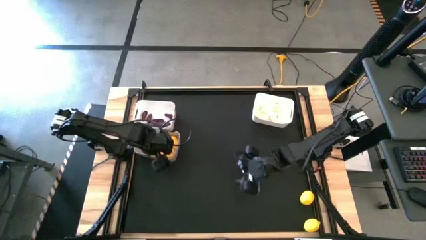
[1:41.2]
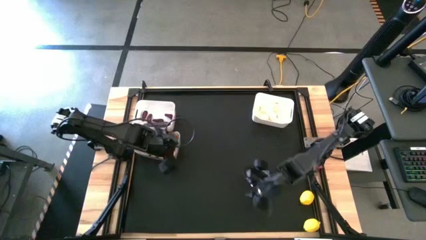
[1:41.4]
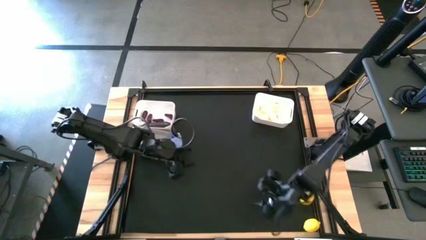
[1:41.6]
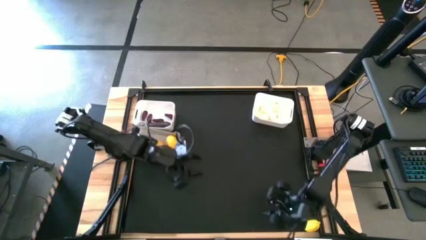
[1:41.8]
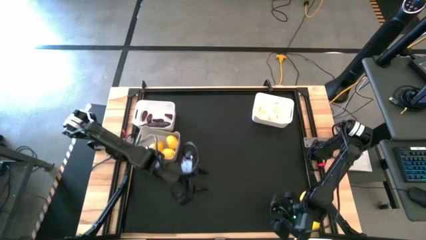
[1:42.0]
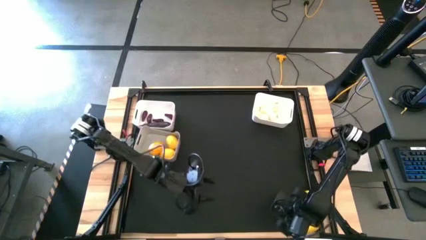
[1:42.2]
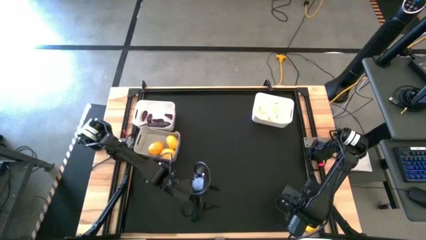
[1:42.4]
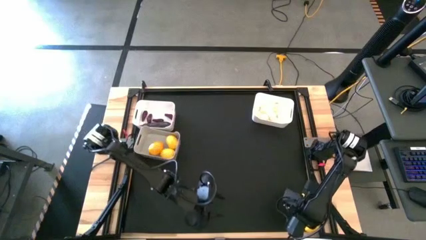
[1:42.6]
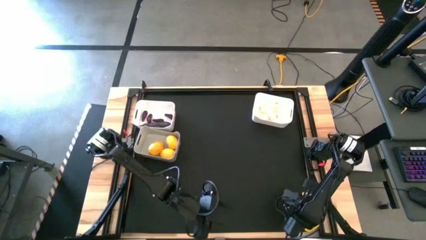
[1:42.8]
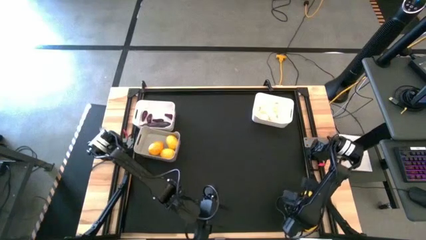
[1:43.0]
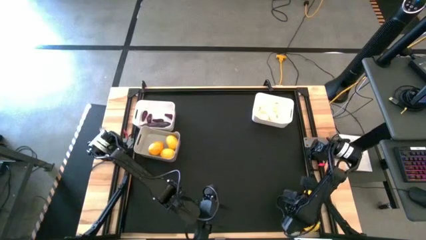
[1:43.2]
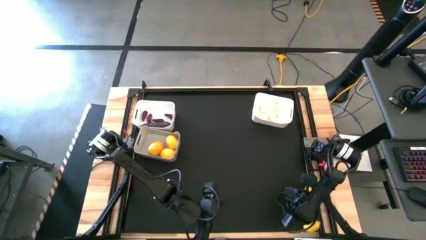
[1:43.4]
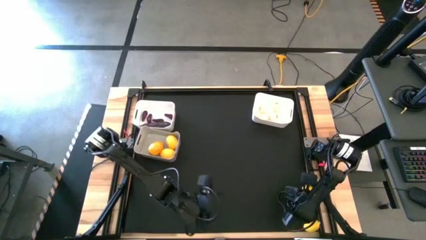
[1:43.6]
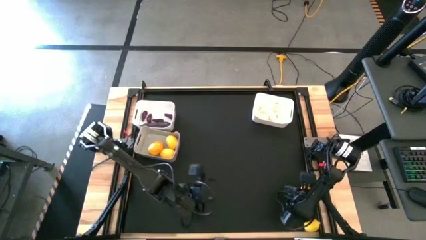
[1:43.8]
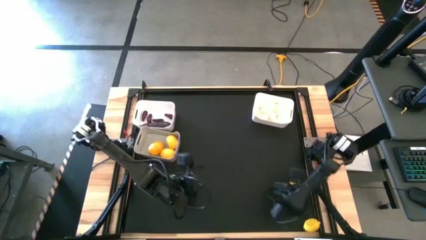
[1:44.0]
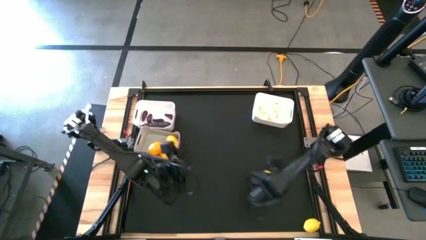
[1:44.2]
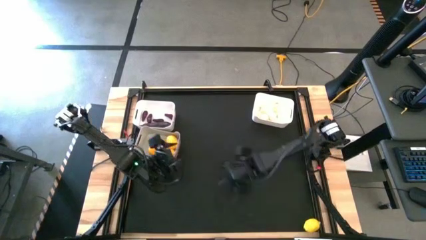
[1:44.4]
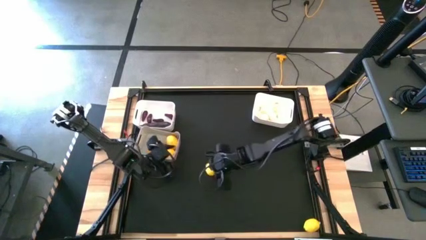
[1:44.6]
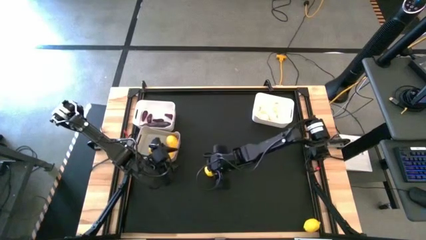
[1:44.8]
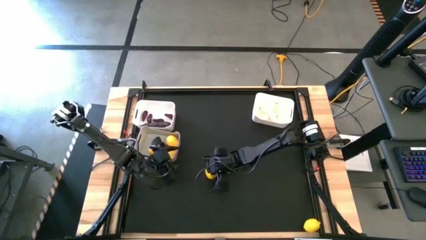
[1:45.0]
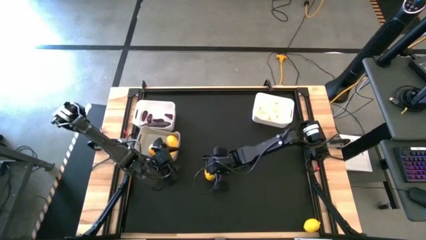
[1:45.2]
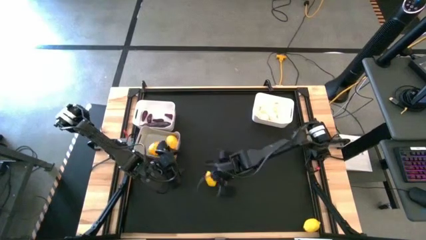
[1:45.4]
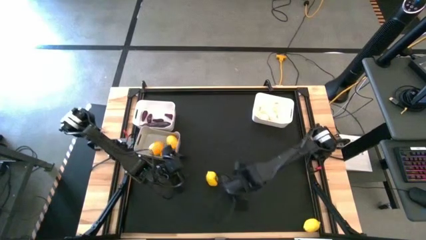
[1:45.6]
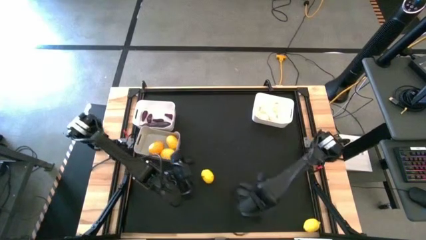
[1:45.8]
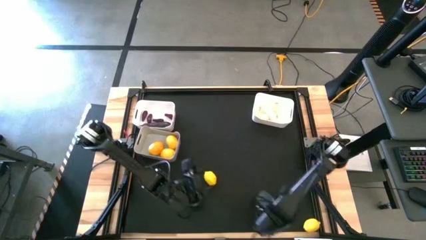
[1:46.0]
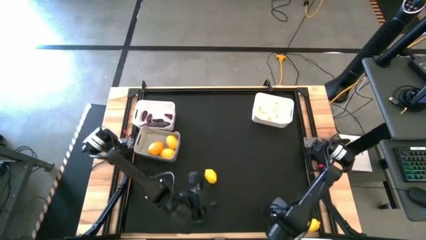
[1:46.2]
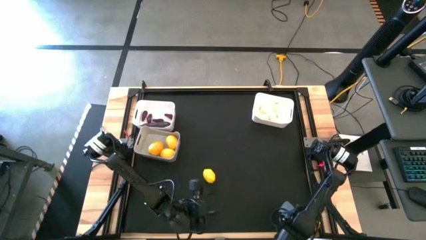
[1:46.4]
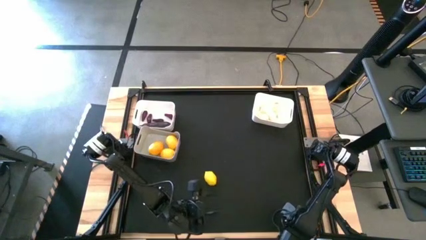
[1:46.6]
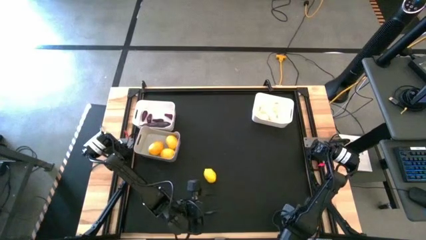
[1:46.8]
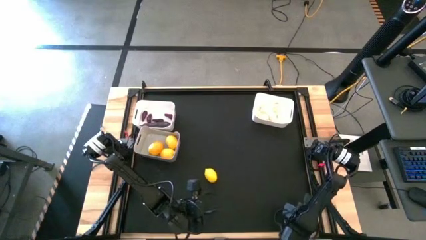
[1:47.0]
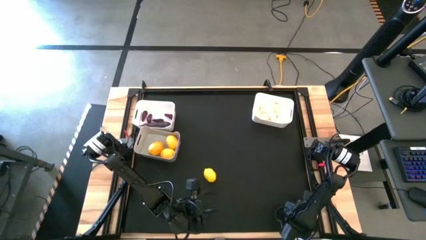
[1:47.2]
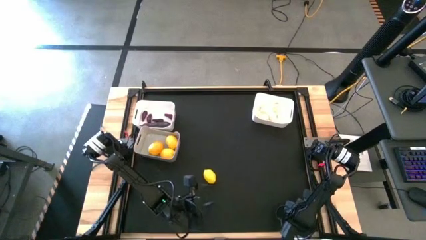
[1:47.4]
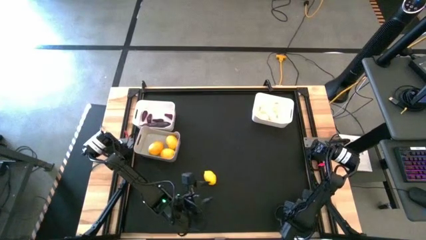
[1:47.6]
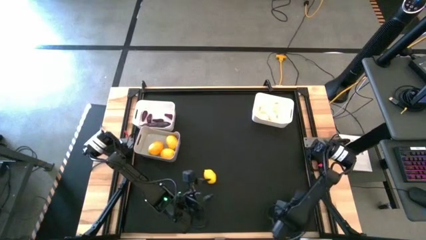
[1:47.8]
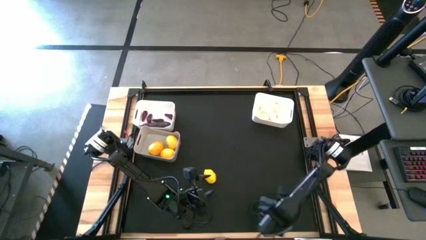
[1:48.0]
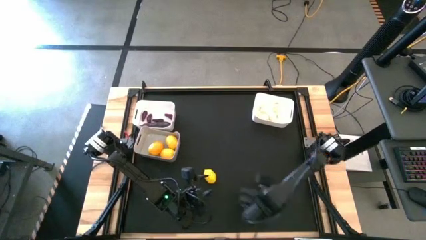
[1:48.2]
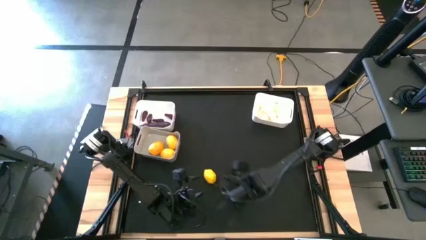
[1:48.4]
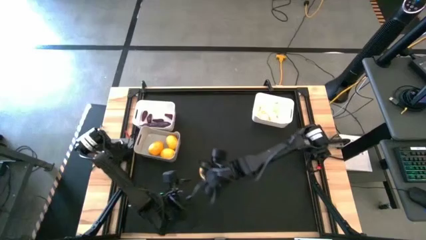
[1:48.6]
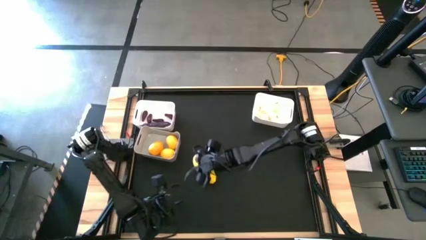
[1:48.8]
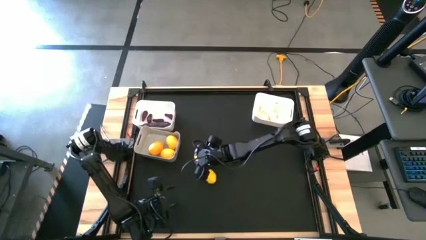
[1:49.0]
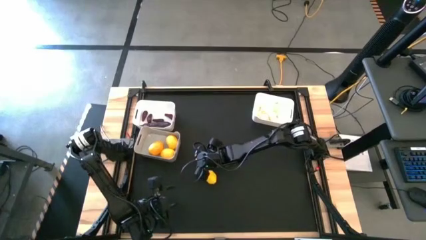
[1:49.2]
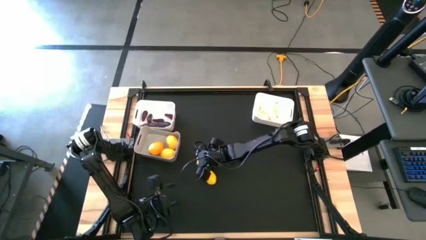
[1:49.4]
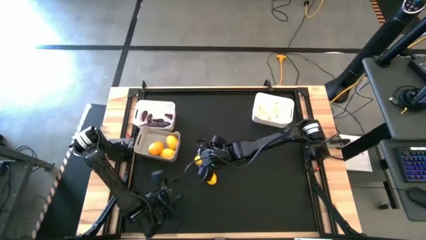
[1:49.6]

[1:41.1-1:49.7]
Task: Sort produce into baskets
Move the lemon to the center of the table

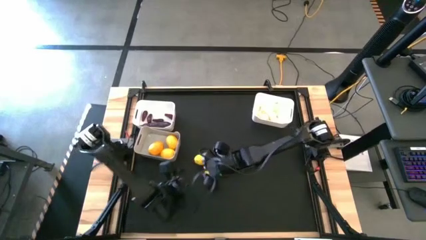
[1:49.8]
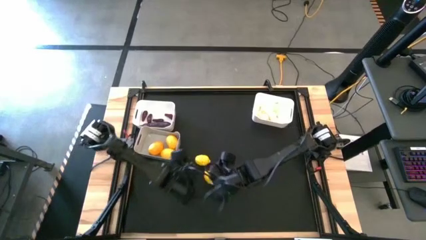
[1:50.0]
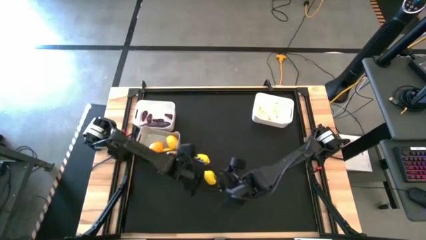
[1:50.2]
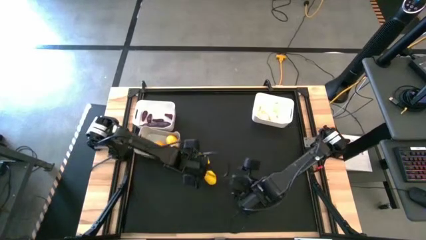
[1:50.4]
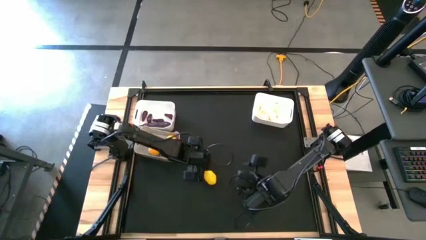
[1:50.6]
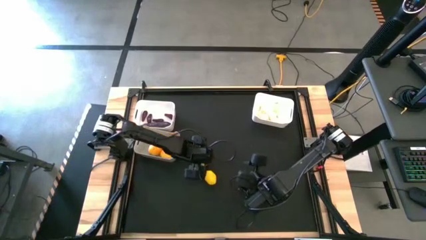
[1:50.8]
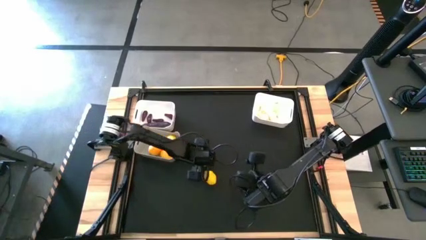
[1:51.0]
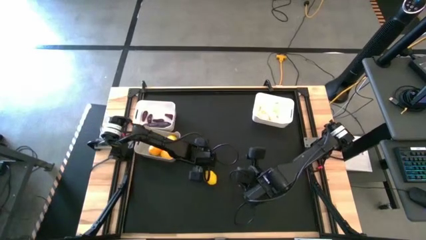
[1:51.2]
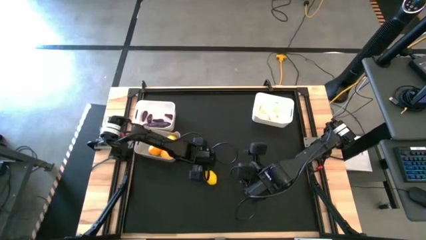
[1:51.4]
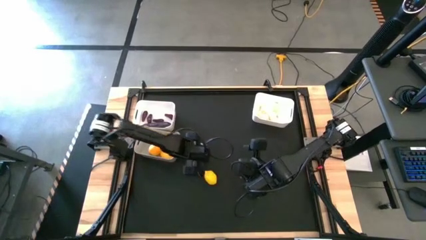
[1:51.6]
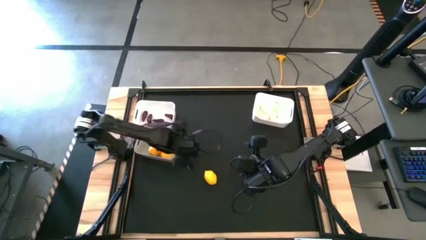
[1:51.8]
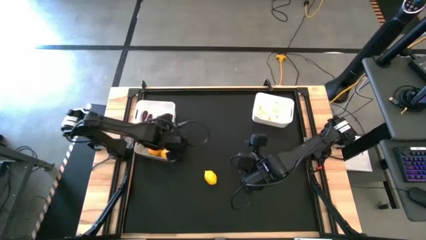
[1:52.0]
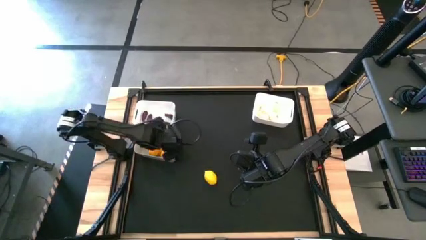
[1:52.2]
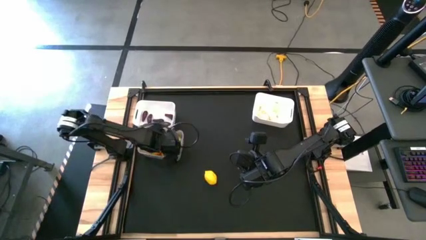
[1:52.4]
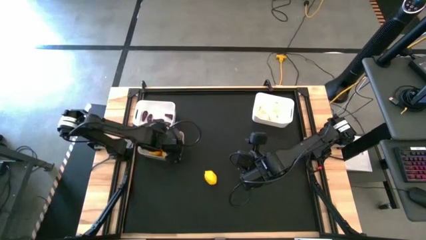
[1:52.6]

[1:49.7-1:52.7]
Put the lemon into the gray bin

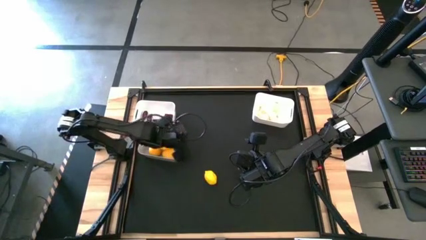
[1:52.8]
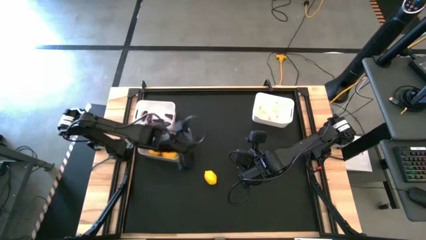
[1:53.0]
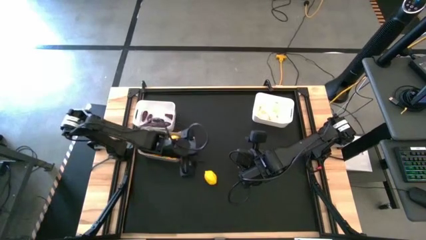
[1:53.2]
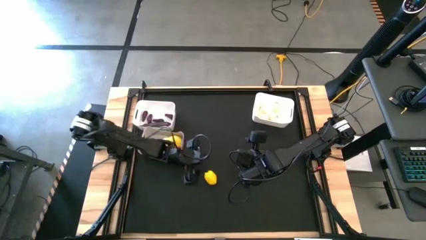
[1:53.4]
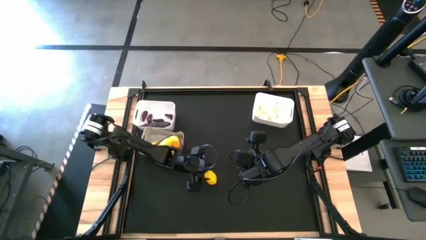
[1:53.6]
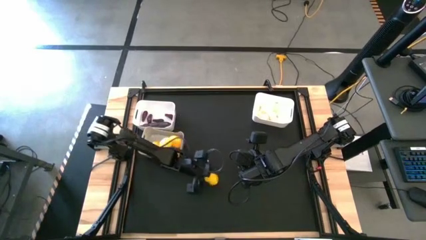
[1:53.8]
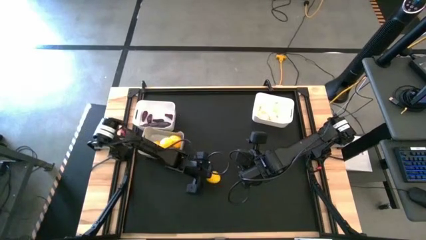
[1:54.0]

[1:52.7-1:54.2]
Put the lemon into the gray bin

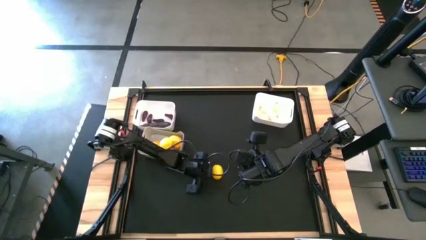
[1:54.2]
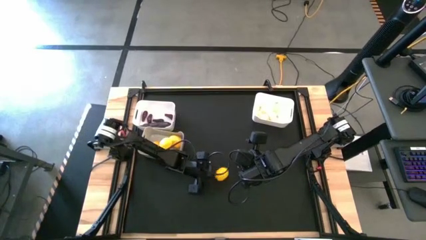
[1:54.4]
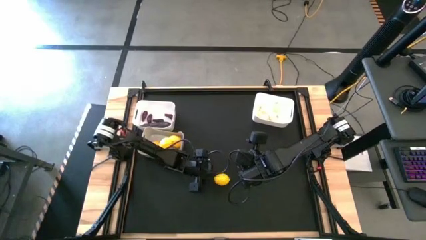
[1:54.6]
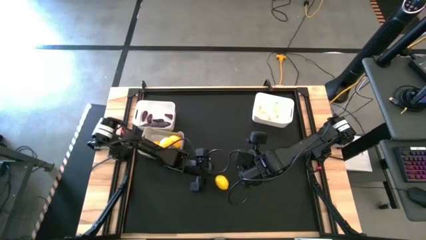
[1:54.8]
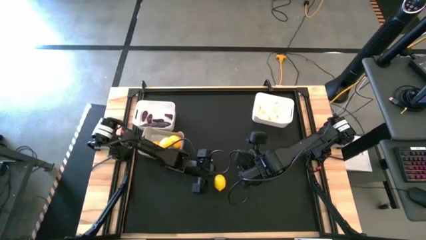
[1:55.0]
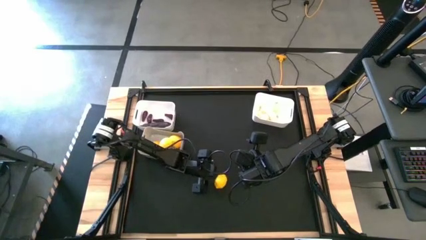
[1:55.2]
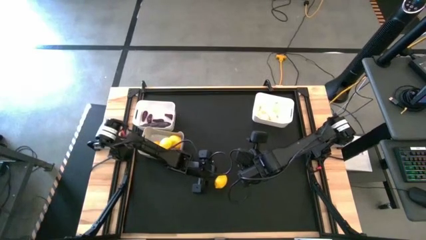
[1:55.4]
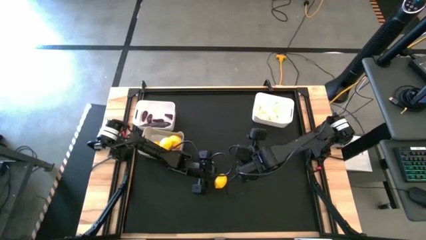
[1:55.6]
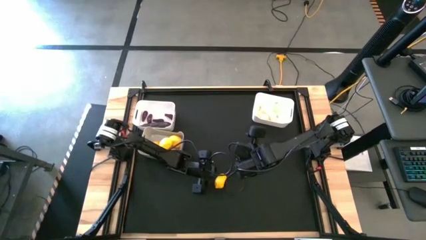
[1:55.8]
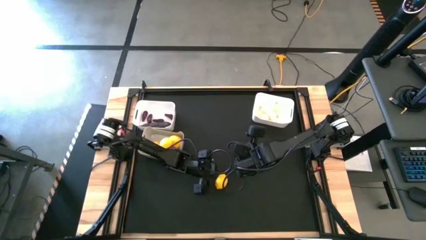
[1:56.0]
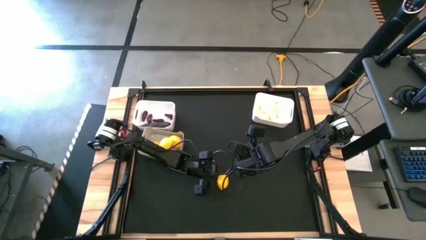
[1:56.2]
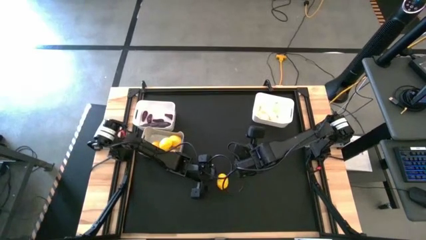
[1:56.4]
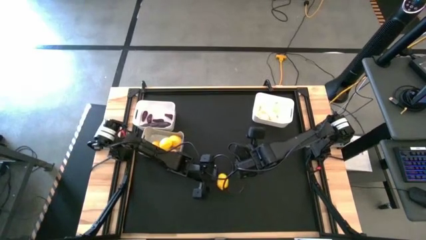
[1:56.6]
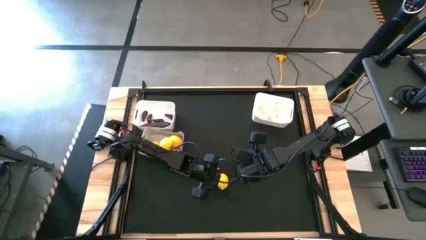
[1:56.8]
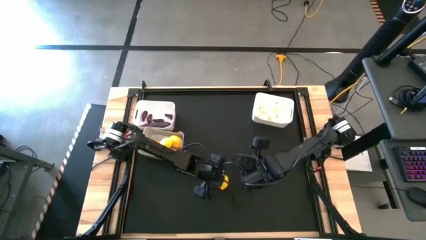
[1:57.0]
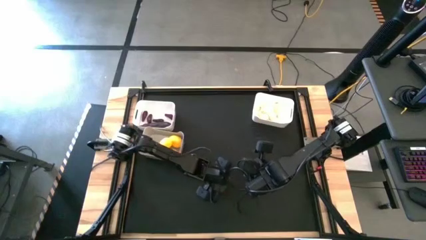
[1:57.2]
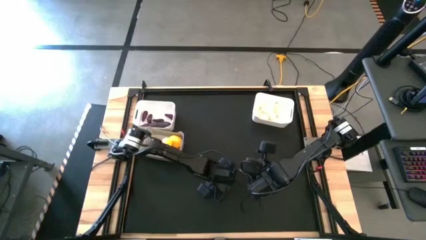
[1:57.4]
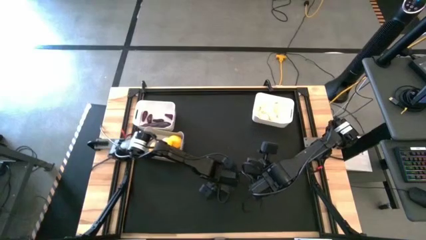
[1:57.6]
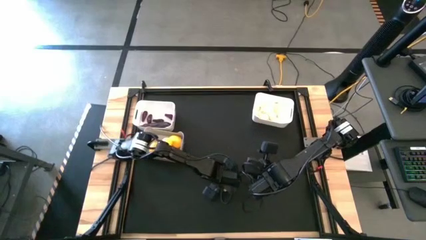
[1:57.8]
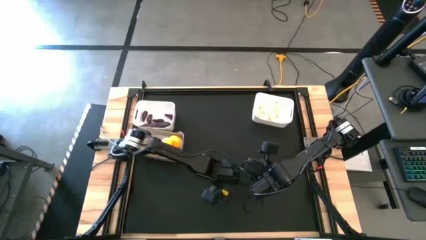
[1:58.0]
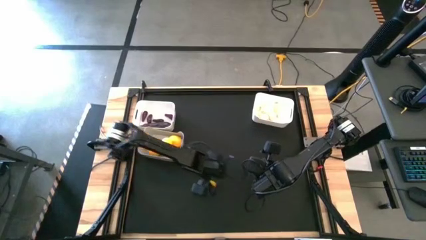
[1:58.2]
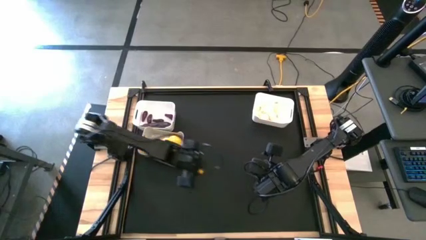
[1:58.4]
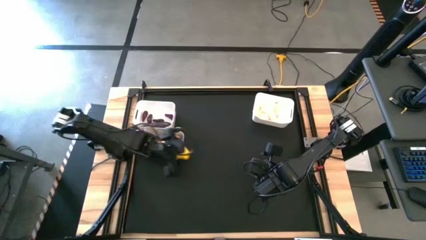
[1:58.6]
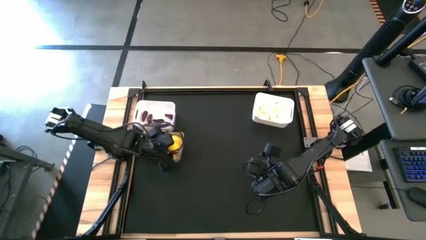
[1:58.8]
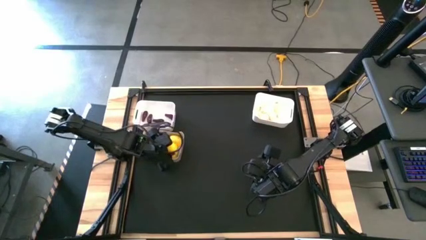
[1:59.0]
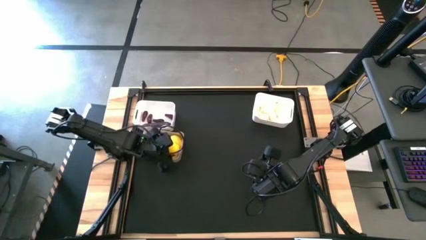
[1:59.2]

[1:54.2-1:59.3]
Put the lemon into the gray bin
